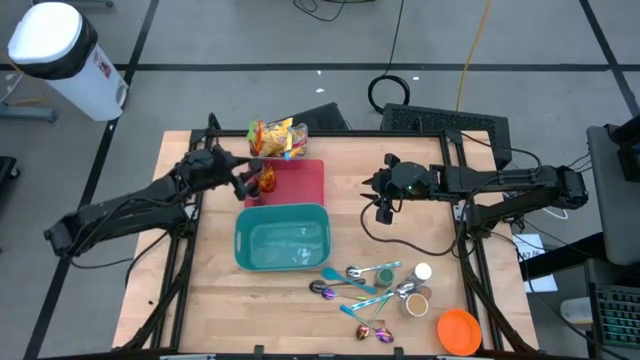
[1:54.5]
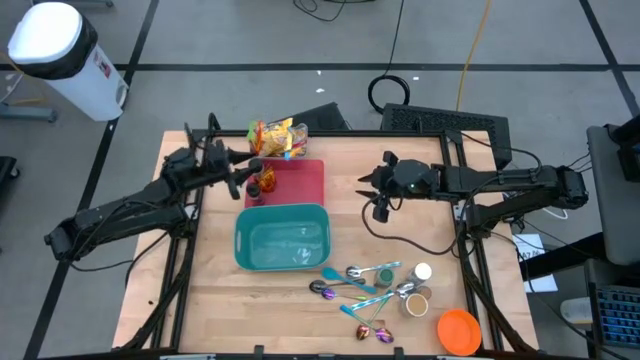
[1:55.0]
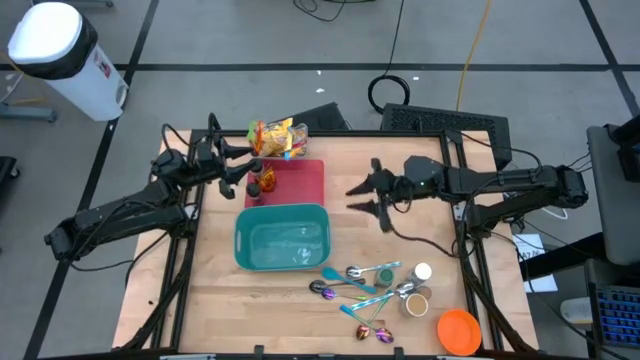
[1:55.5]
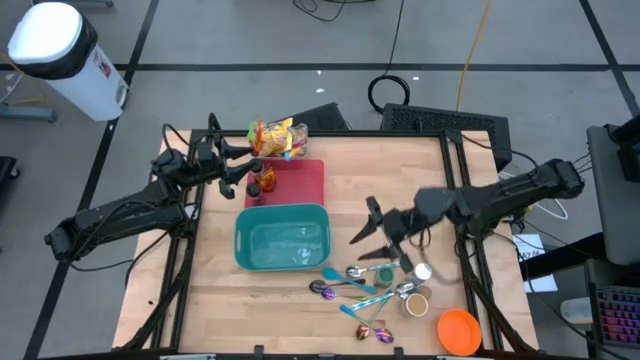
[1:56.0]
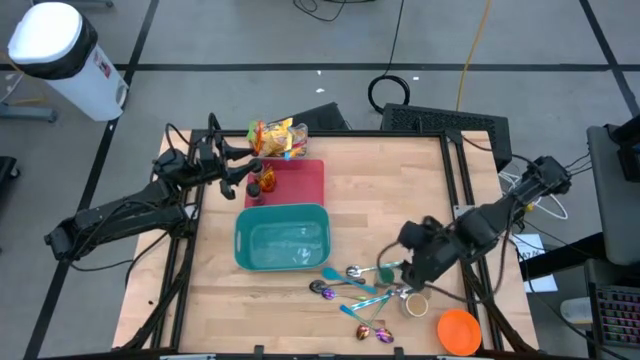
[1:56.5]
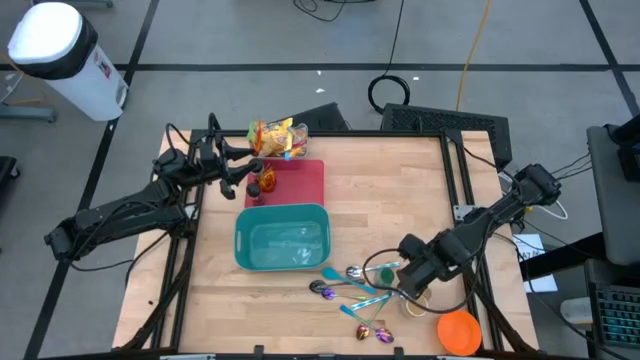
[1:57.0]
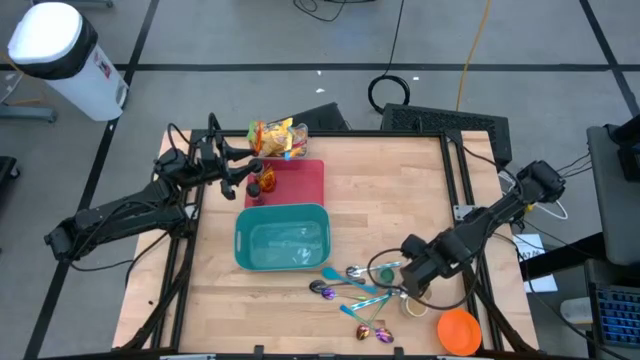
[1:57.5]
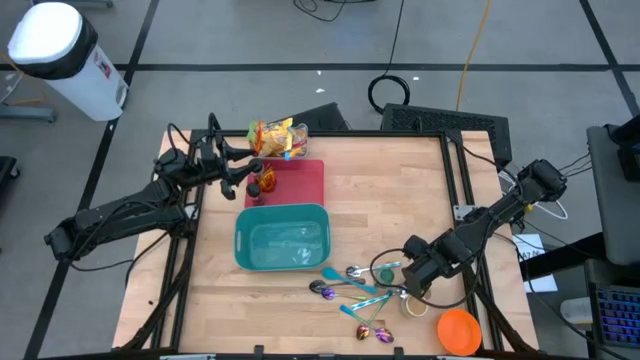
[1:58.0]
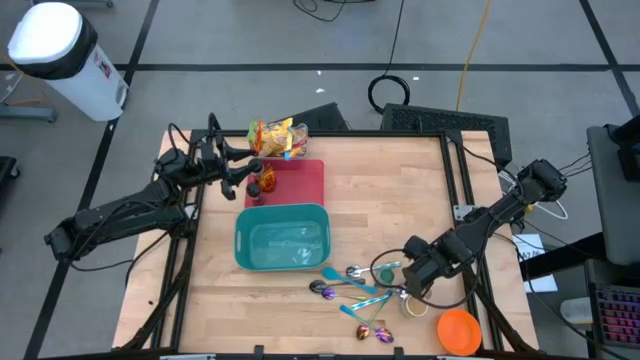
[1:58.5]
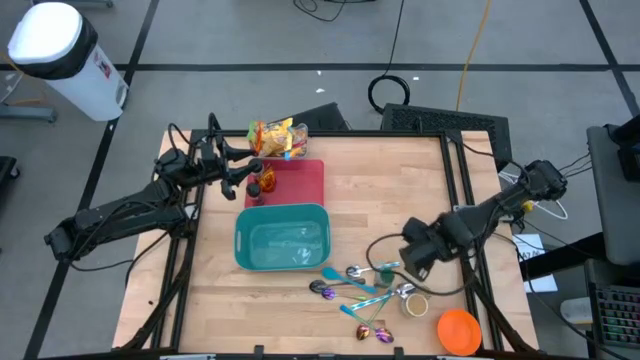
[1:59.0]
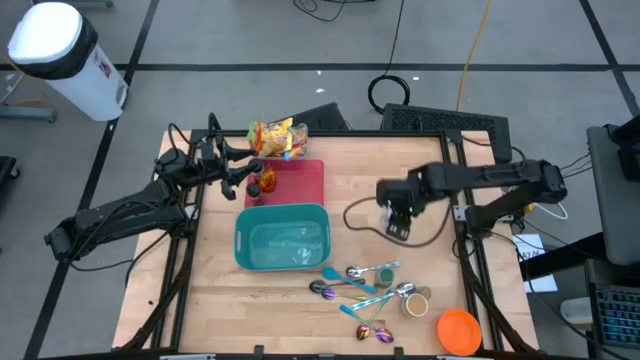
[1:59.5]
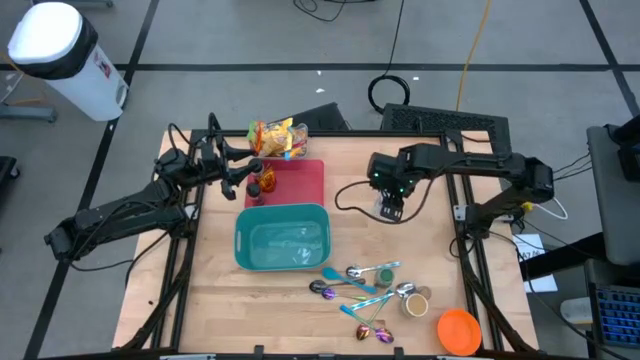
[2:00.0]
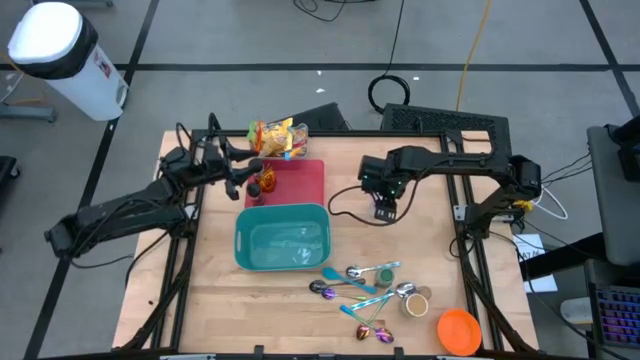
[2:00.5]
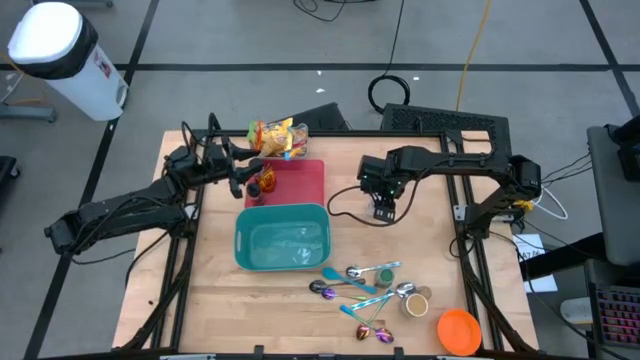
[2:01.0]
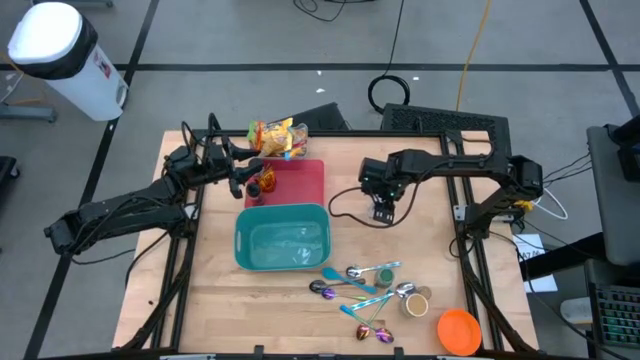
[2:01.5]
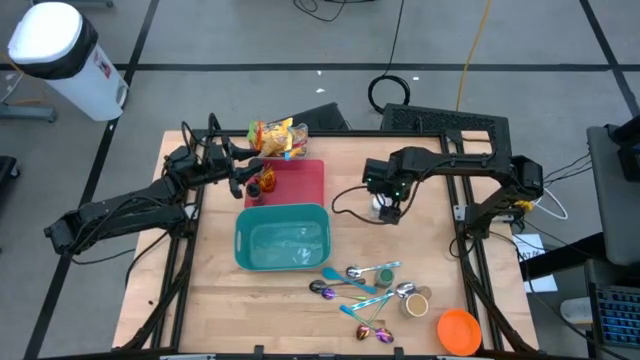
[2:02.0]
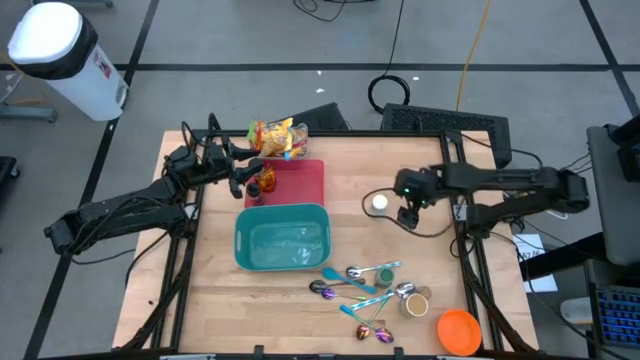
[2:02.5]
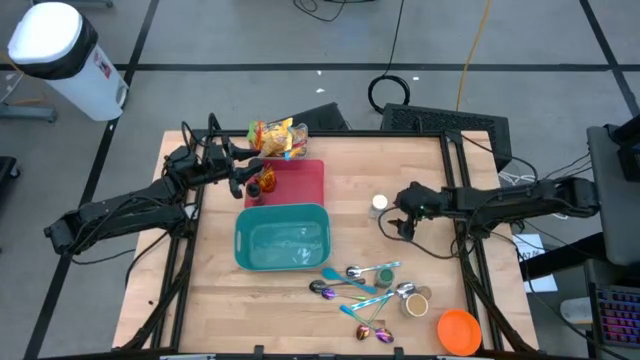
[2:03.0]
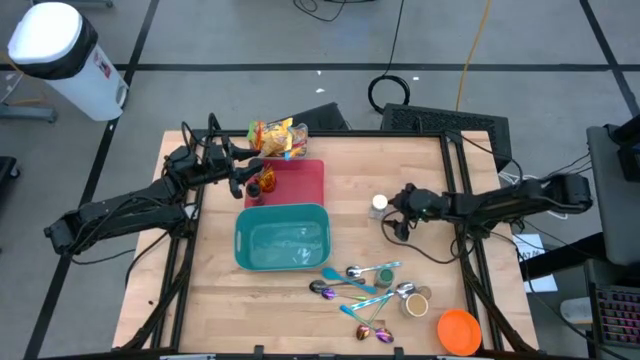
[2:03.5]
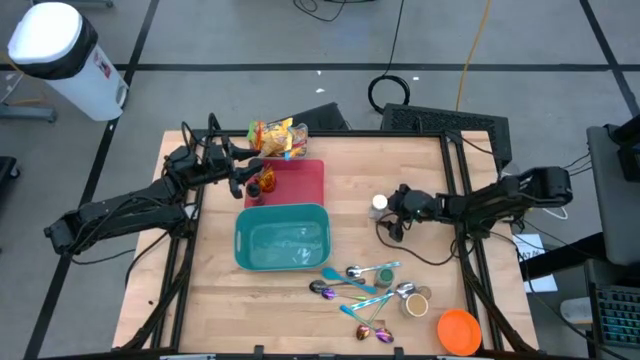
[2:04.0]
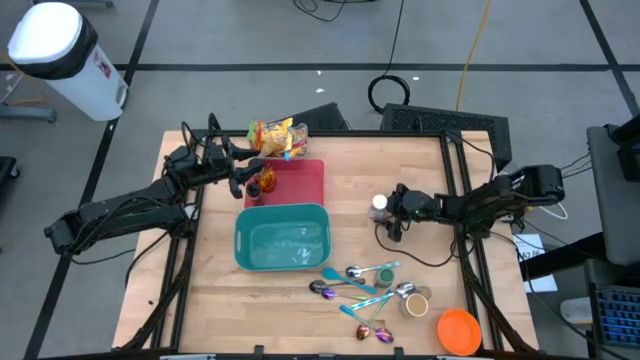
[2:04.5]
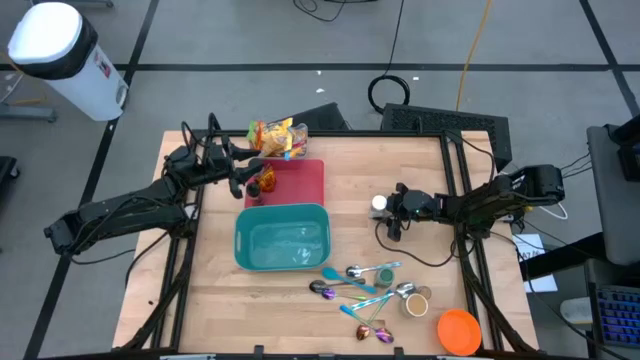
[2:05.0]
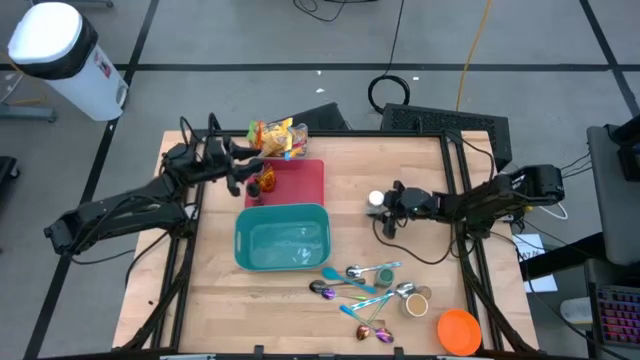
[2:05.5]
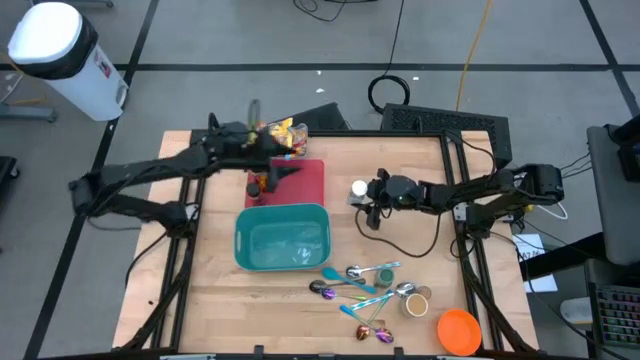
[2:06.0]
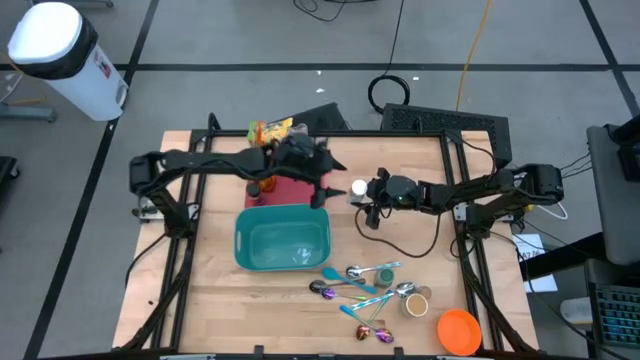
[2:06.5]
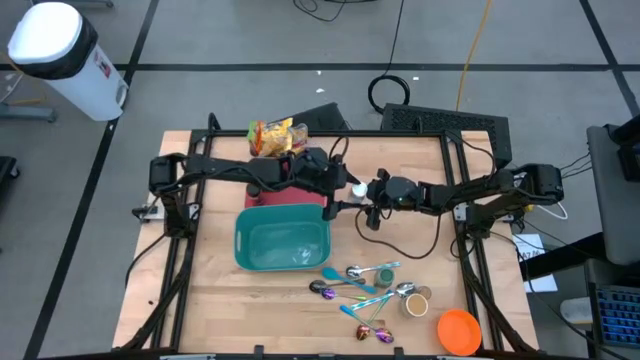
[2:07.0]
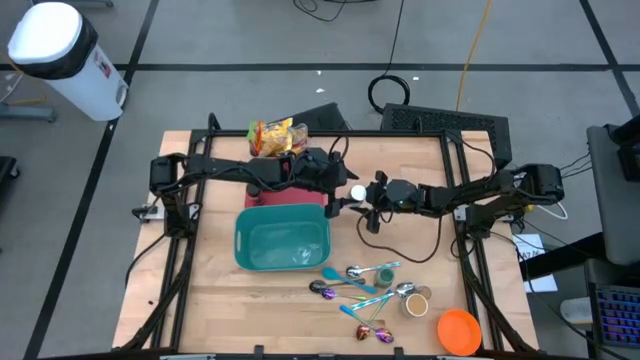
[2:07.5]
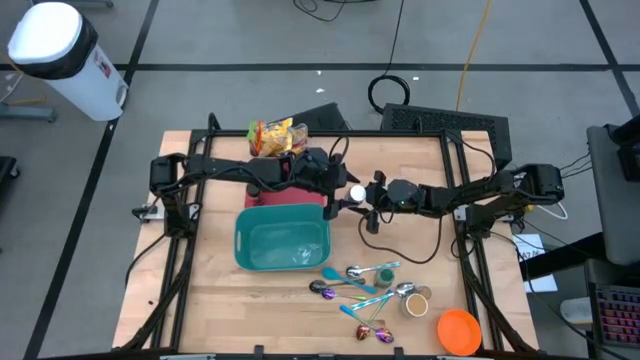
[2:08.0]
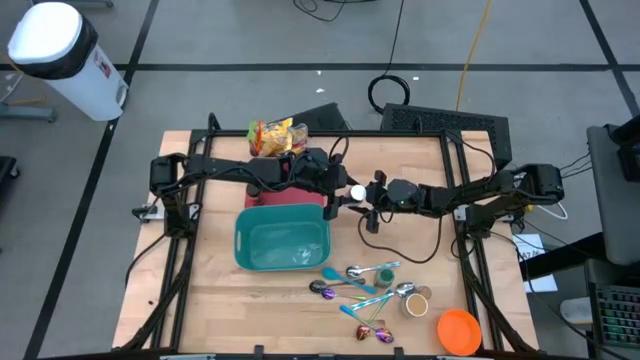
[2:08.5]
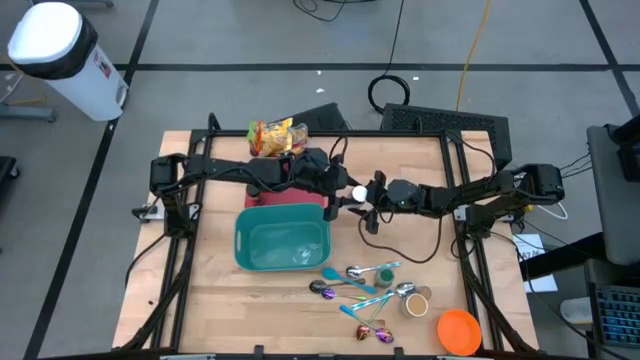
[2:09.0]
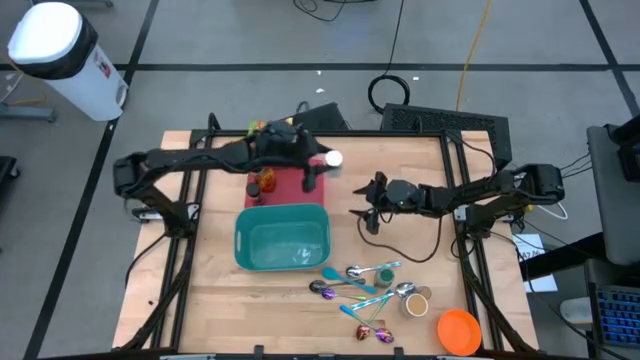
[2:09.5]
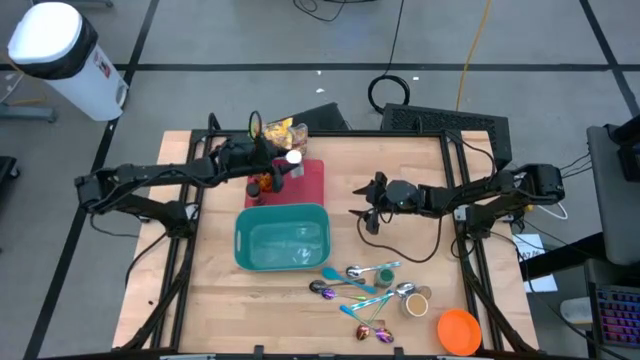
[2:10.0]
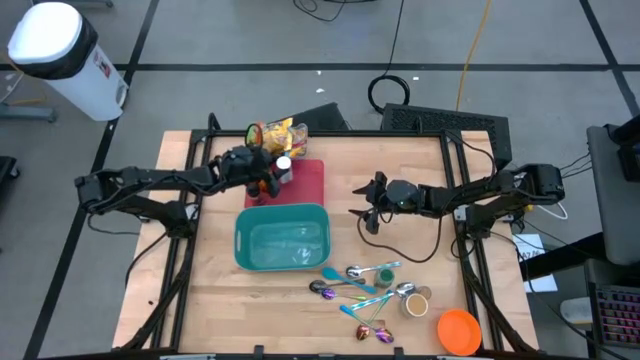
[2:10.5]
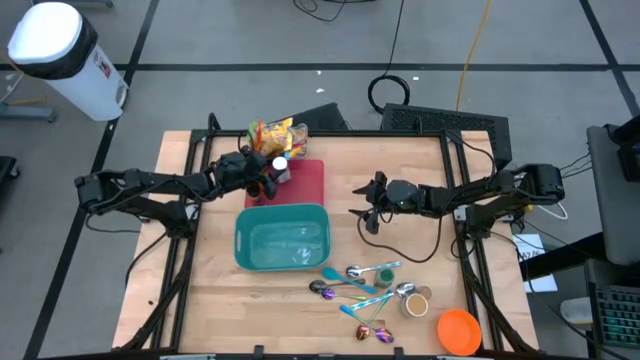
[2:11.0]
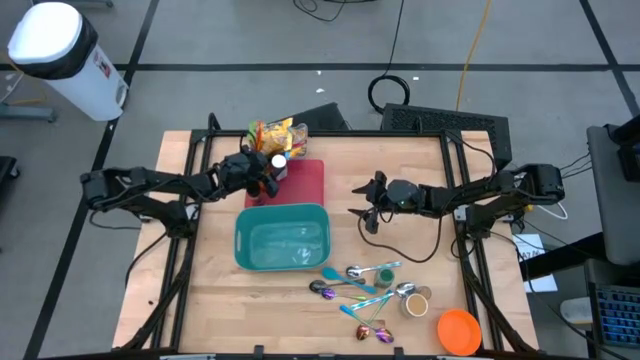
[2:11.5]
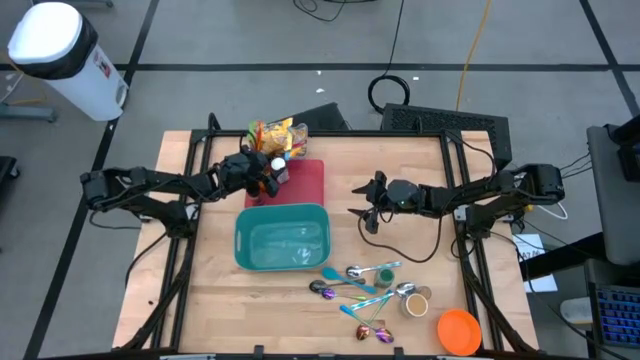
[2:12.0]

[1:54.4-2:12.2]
Task: Pick & Place Food Item
Put the white seasoning bottle into the red bin

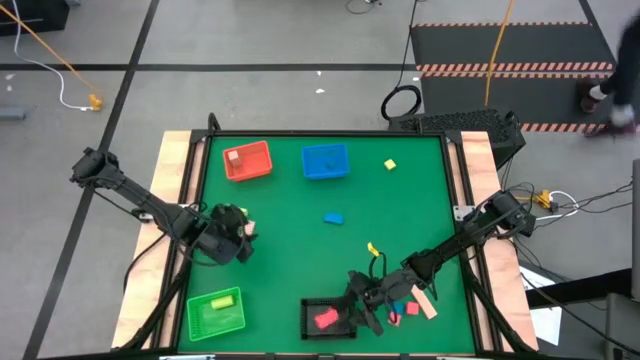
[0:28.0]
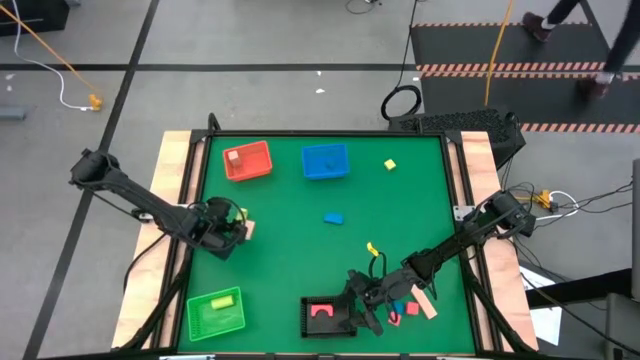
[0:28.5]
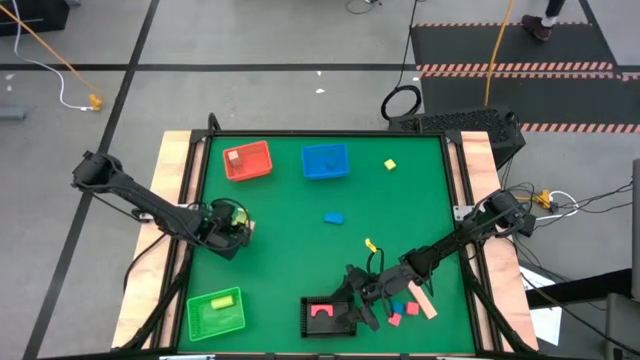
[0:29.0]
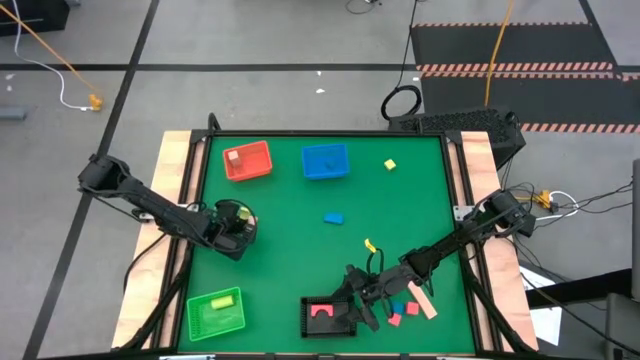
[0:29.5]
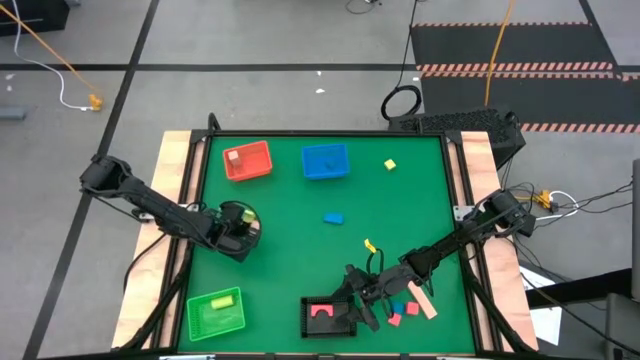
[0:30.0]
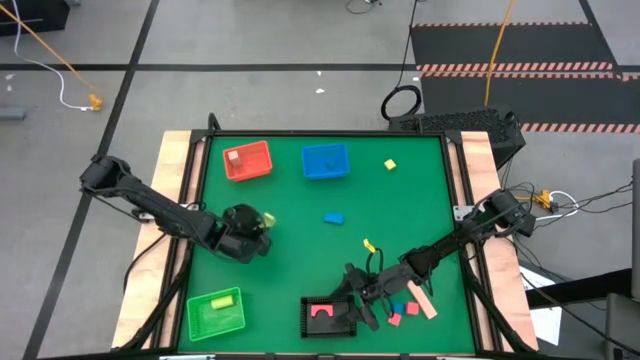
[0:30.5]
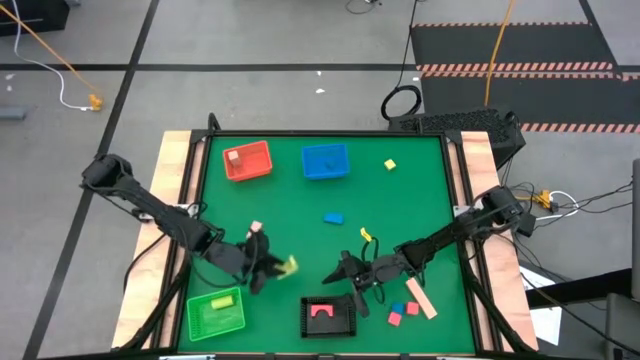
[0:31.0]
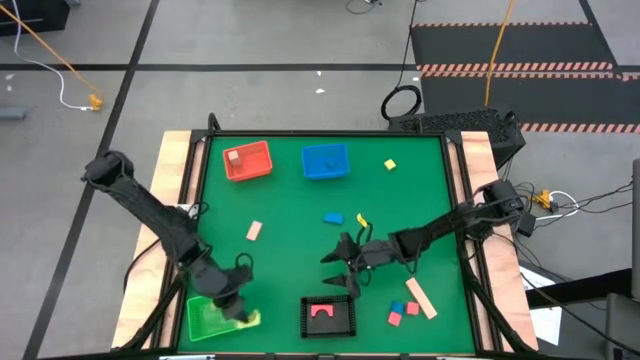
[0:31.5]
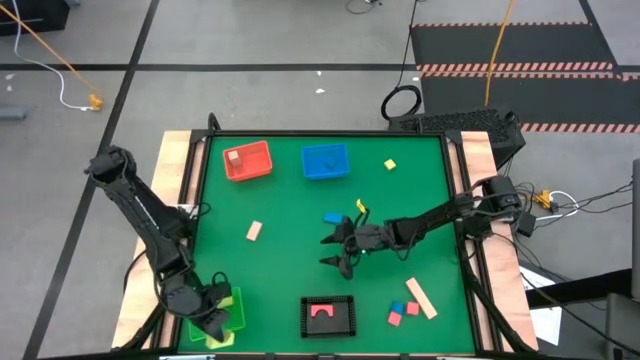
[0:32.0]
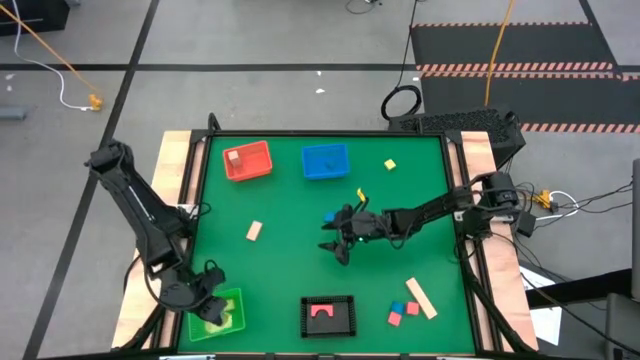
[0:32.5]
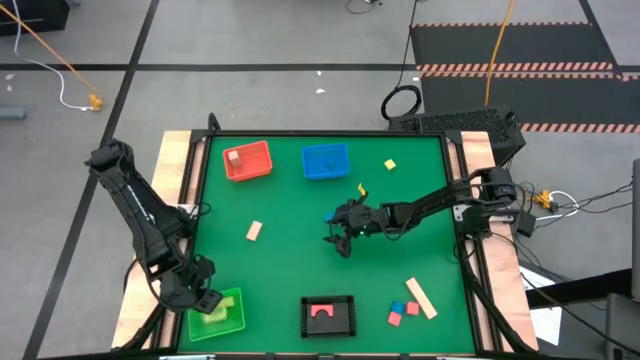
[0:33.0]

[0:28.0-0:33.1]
Task: Sort & place blocks by color
Put the bottom green block into the green bin
